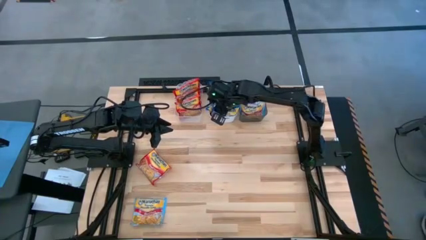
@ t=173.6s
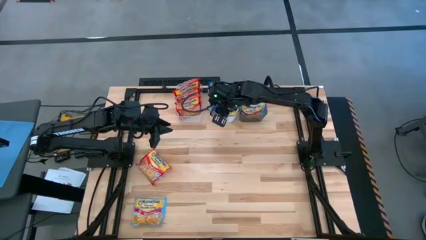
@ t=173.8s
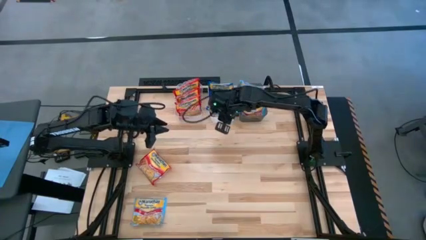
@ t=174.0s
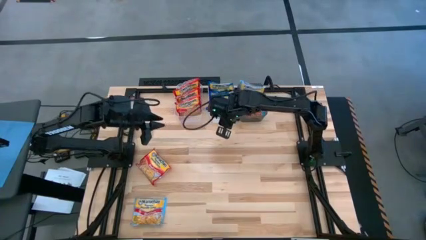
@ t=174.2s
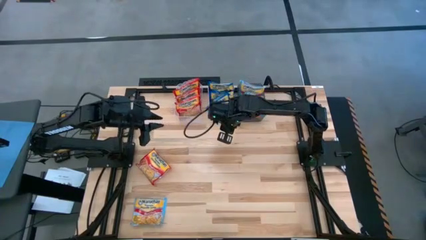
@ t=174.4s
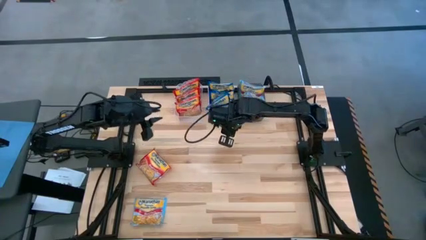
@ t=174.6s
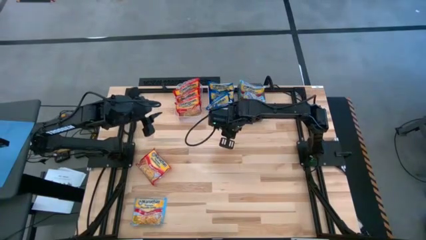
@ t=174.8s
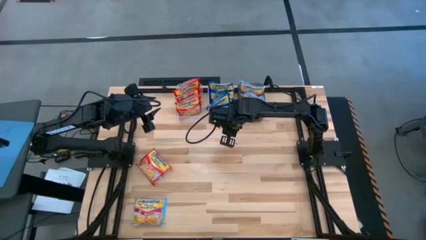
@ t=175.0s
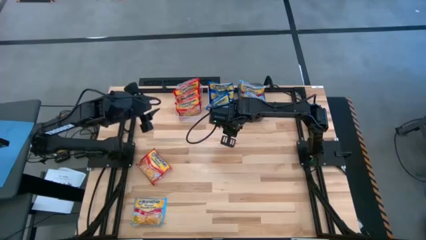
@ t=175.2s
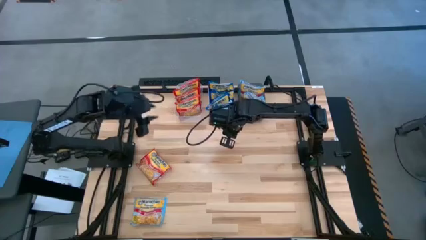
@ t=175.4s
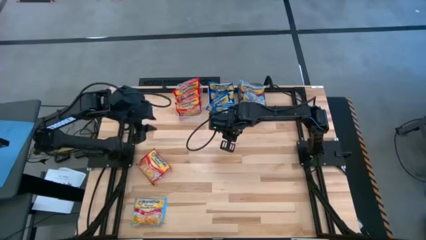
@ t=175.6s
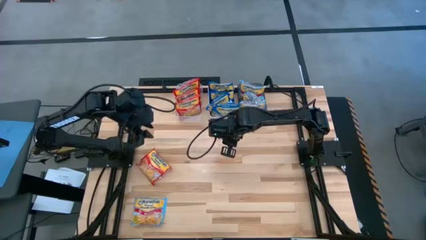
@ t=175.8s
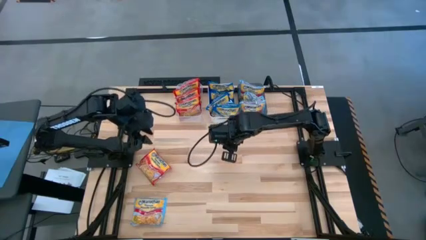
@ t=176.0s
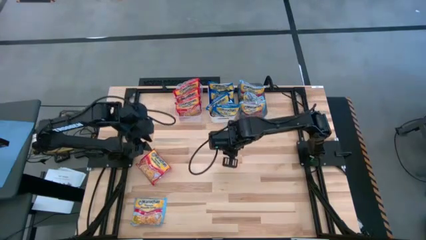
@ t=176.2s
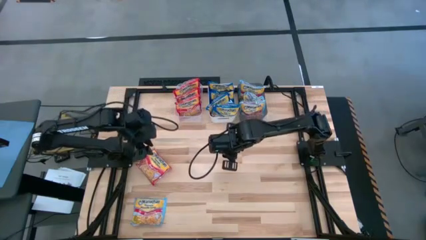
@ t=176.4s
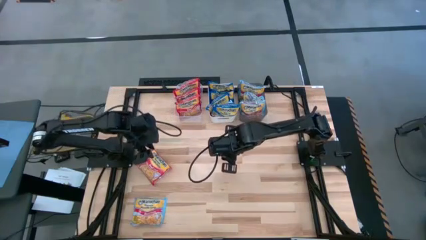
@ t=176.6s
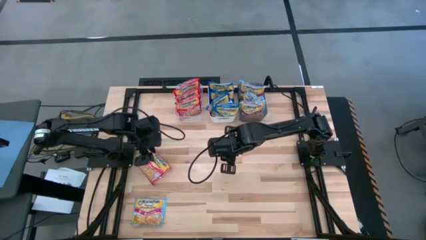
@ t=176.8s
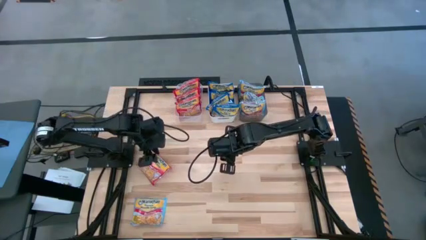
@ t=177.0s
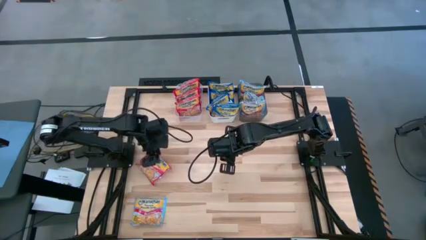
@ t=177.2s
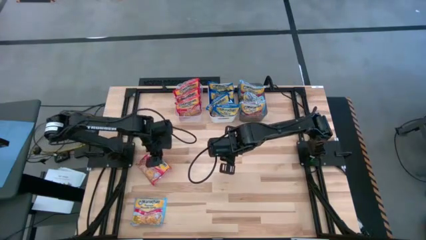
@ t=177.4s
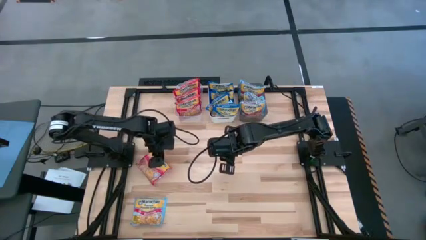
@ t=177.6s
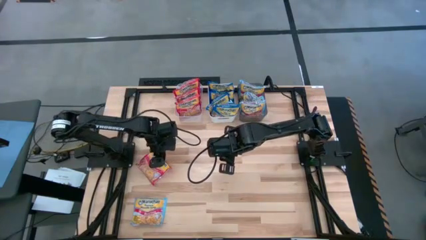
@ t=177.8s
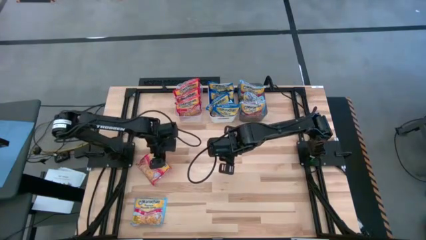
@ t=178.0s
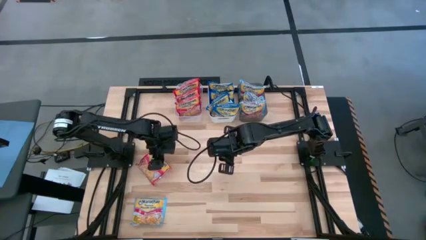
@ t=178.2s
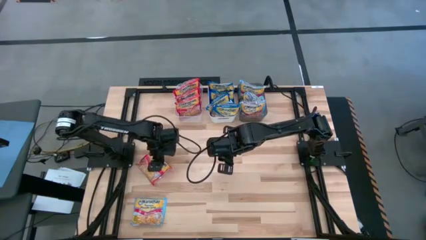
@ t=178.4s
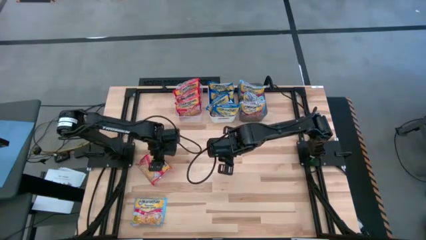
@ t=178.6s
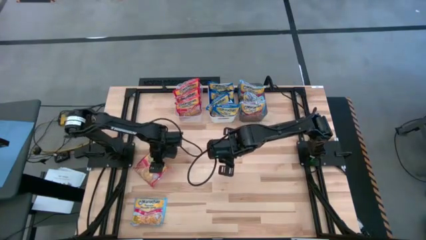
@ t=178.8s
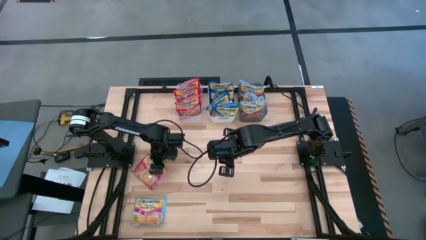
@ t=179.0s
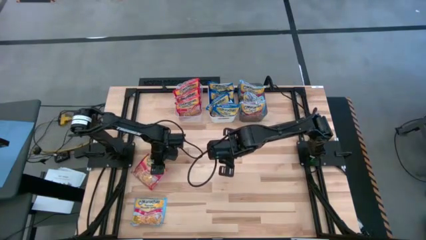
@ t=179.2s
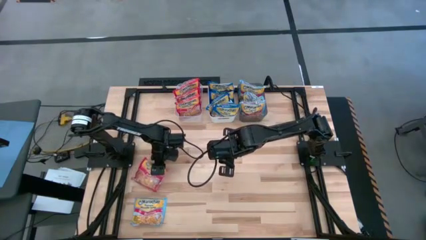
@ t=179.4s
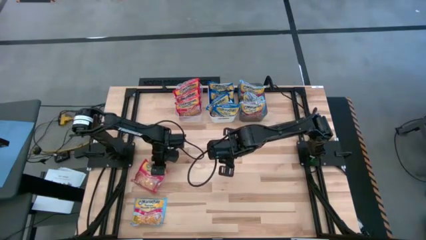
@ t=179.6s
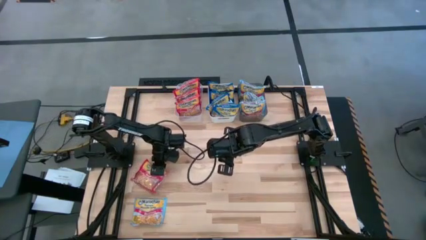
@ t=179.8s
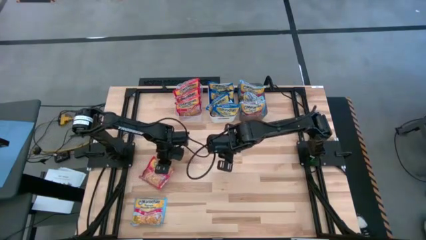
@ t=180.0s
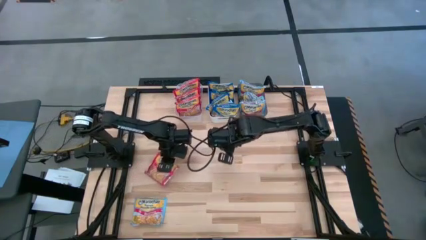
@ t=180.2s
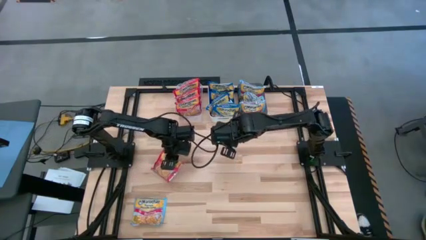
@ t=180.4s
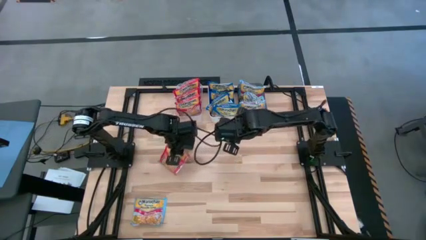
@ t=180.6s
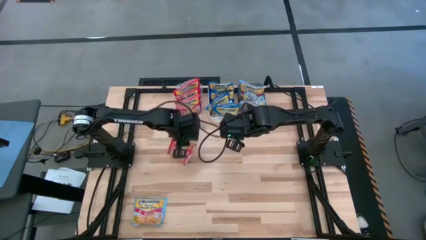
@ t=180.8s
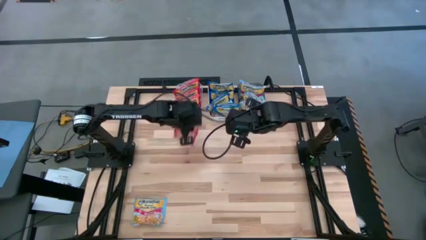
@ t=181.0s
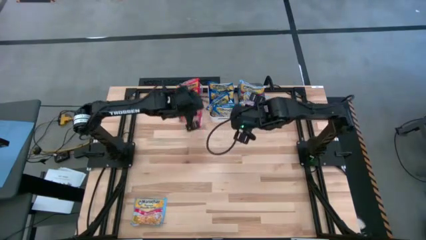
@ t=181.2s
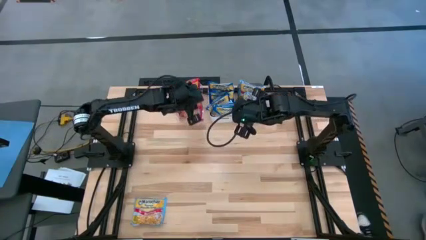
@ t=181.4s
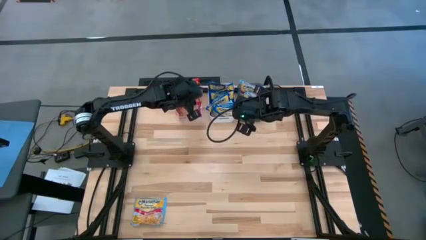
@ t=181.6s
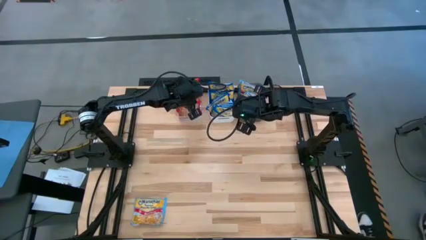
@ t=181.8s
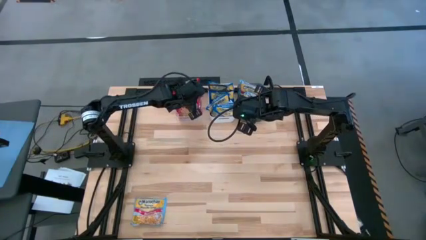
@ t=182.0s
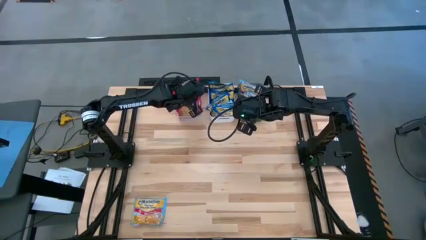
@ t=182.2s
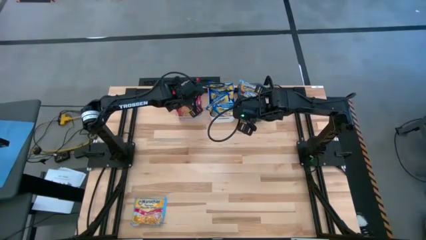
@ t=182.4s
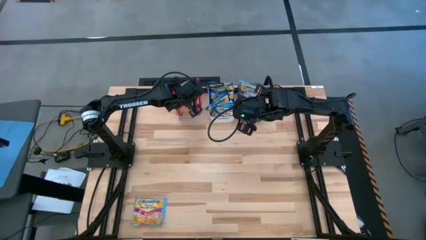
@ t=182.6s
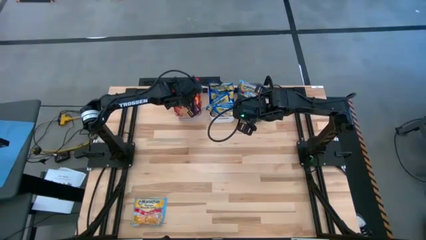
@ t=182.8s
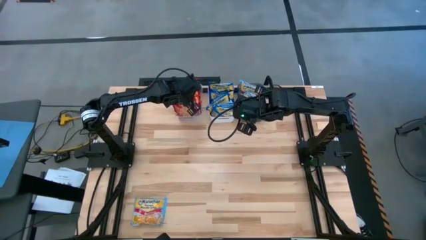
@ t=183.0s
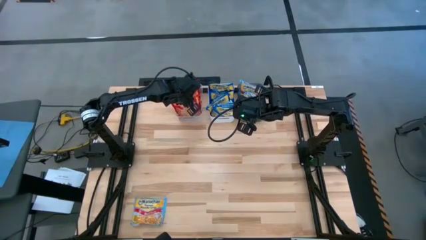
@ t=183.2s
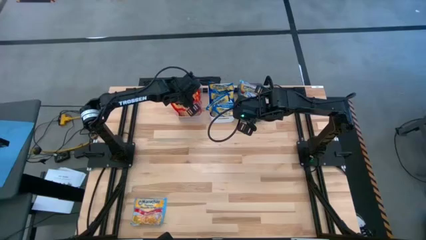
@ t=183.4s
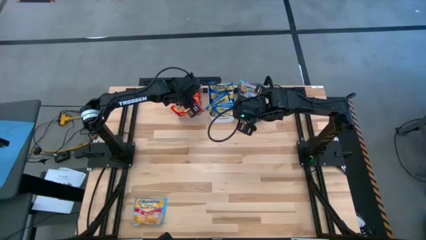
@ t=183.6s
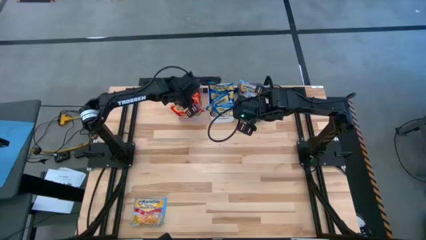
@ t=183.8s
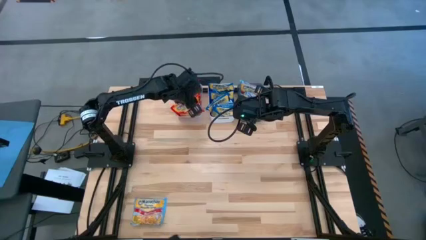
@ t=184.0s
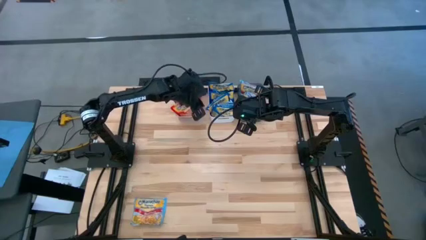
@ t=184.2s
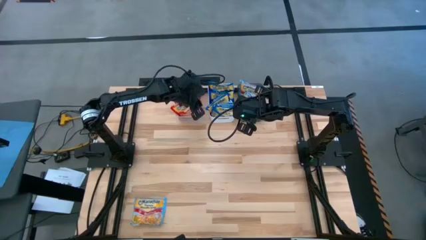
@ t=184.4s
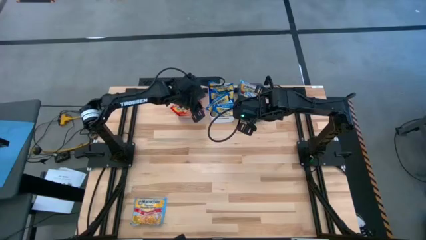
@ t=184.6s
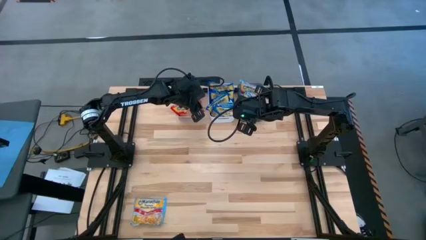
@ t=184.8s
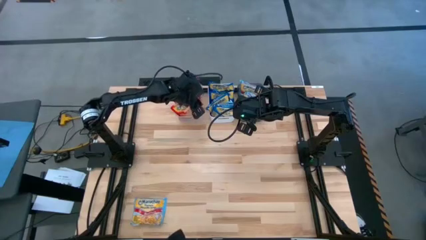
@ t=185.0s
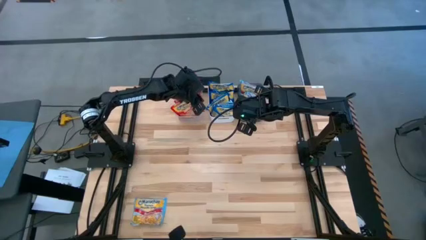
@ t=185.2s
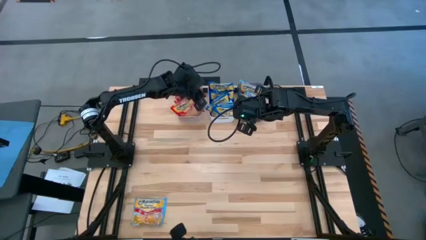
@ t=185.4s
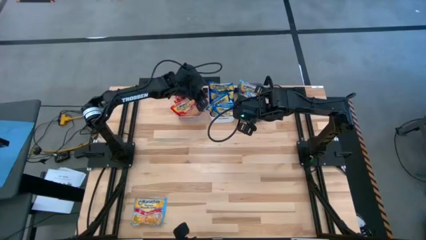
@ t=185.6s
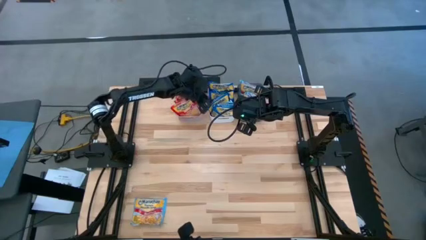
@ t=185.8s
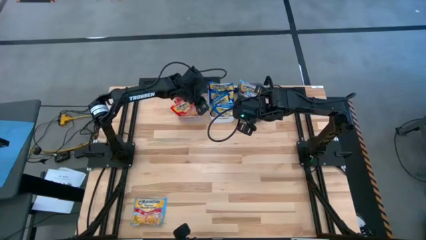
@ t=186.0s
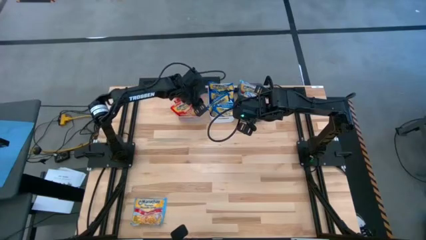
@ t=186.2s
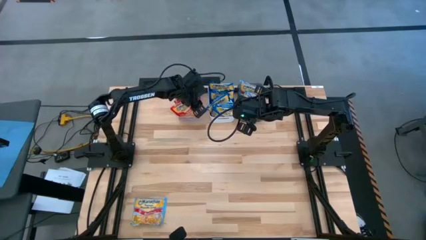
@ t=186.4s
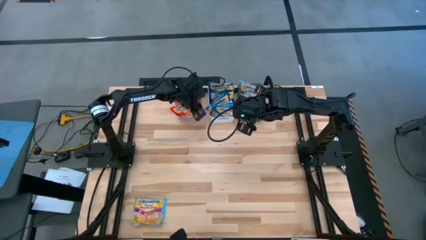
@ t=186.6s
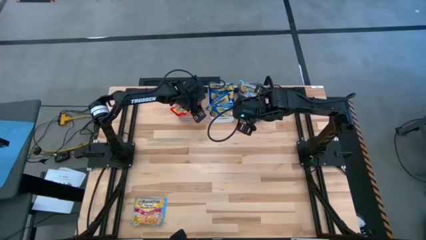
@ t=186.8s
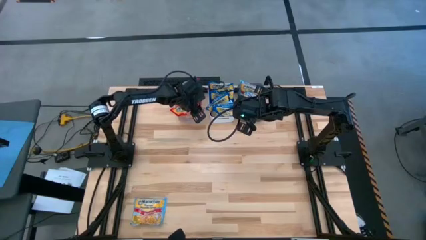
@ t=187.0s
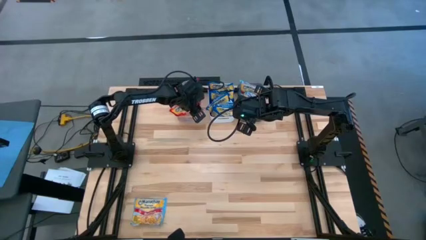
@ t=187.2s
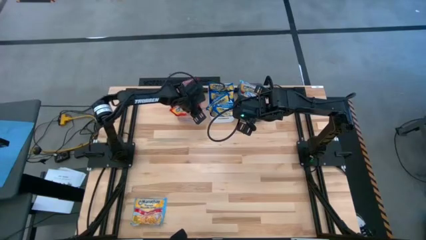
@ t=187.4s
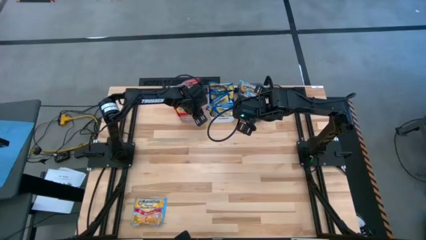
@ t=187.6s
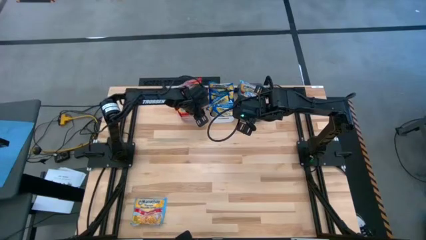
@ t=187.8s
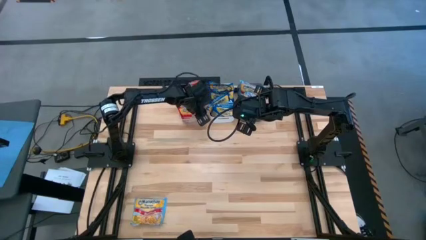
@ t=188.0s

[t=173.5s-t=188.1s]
Task: Sort Maruchan noodles
Put the red noodle pack into the transparent bin
